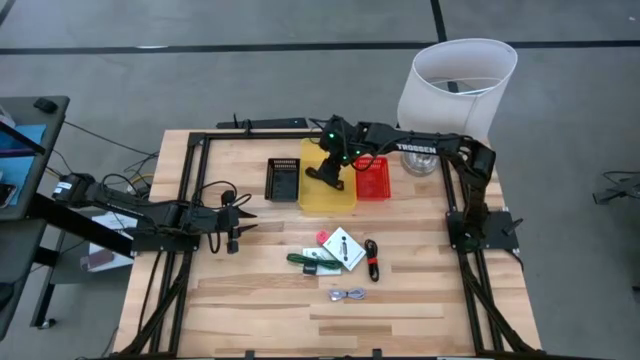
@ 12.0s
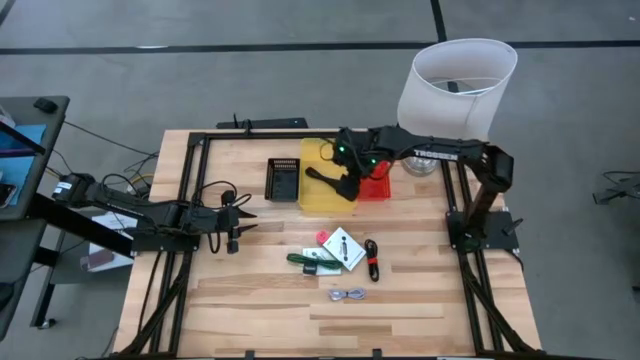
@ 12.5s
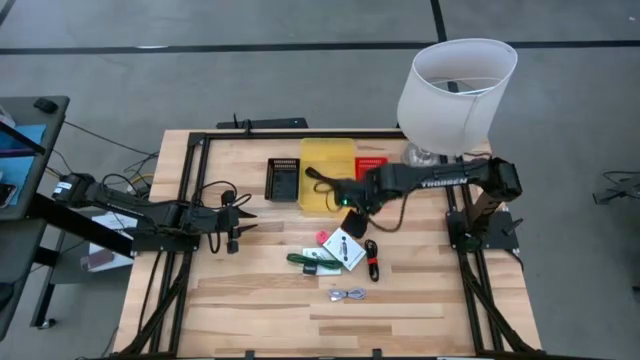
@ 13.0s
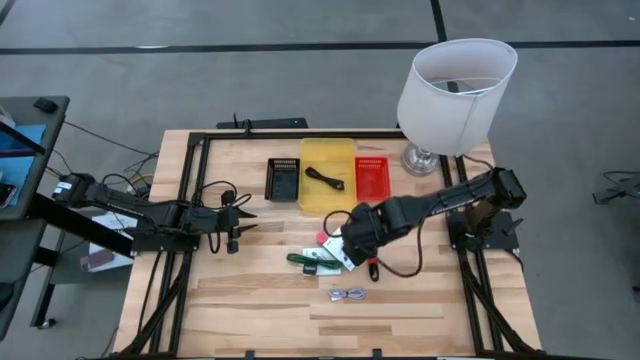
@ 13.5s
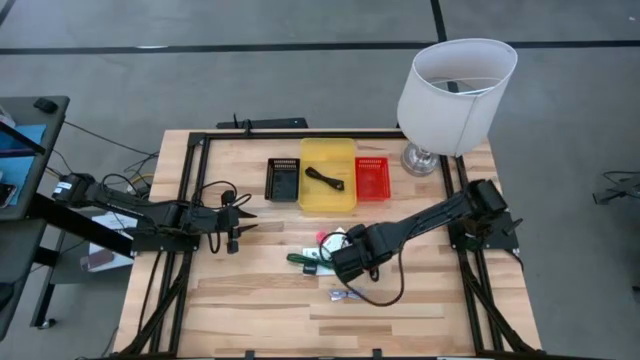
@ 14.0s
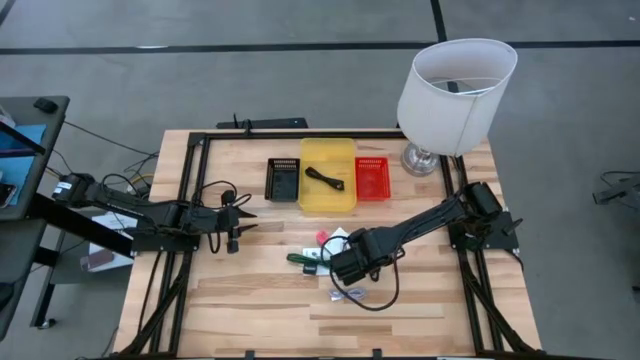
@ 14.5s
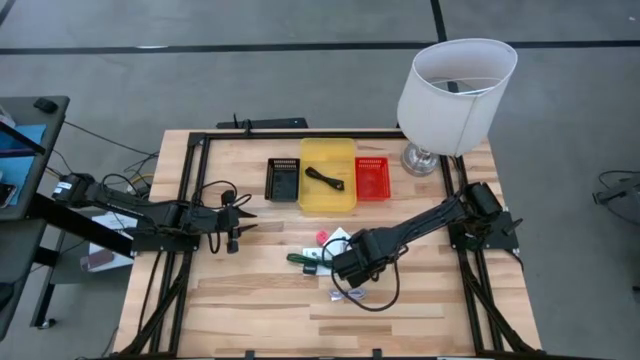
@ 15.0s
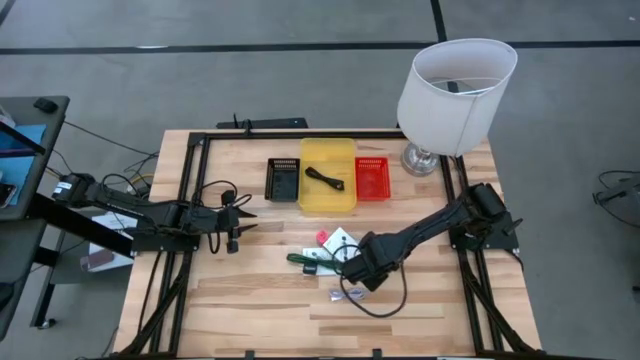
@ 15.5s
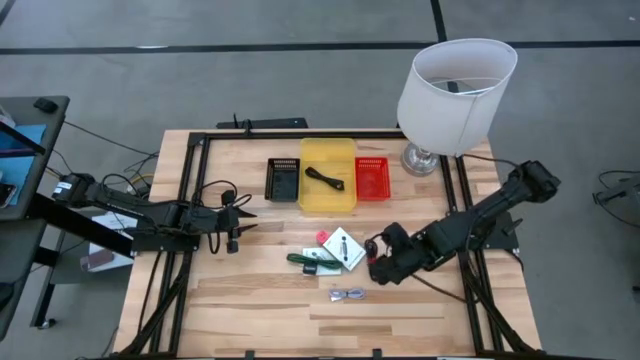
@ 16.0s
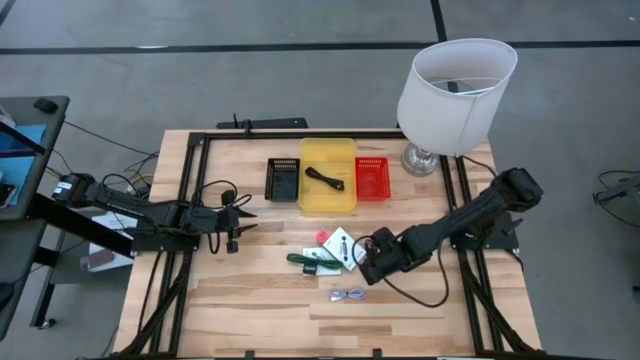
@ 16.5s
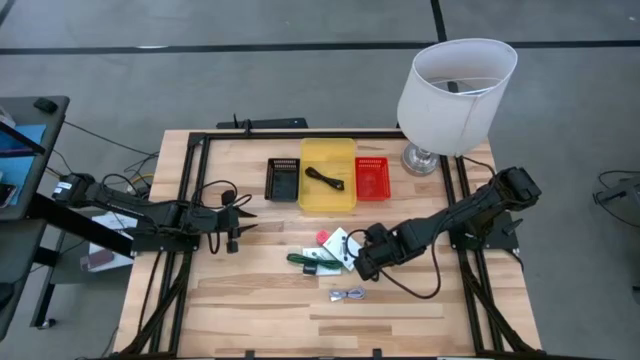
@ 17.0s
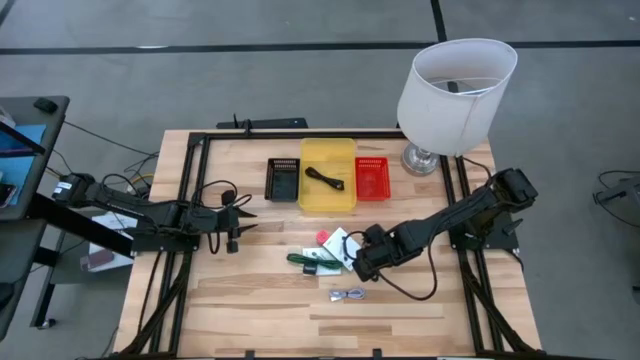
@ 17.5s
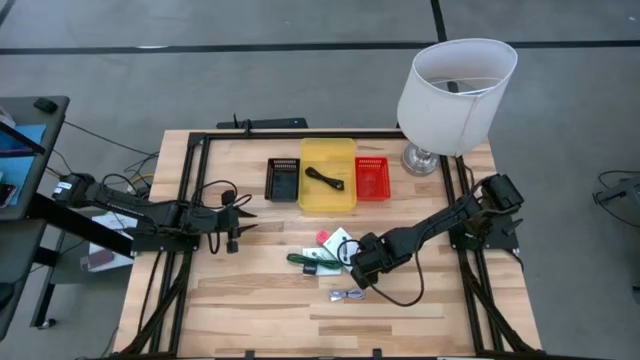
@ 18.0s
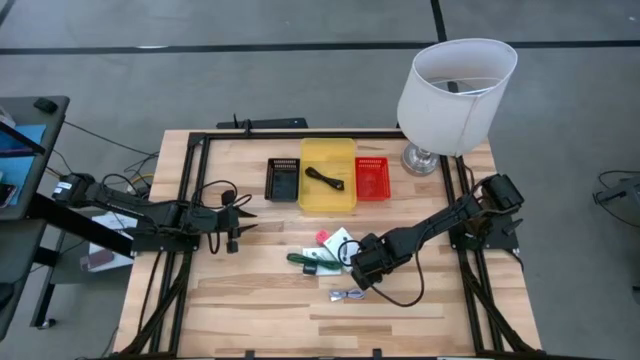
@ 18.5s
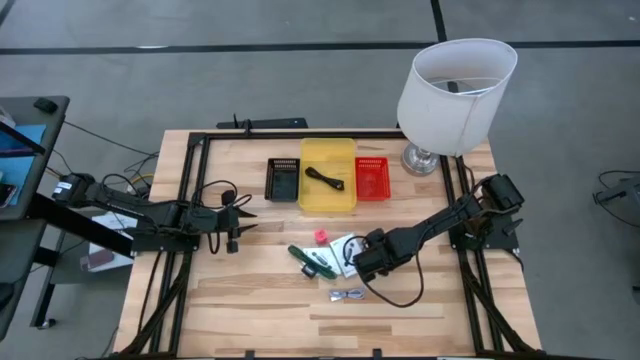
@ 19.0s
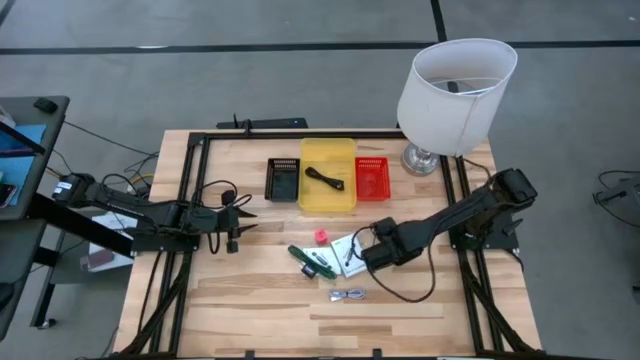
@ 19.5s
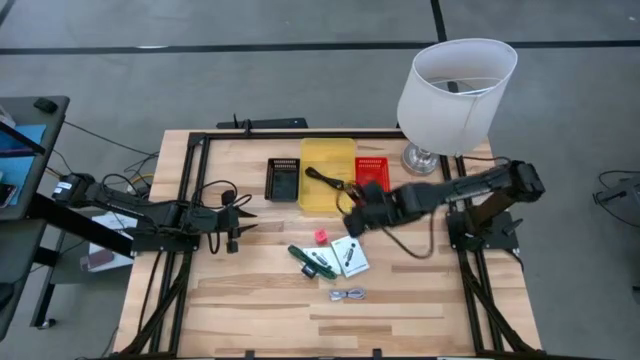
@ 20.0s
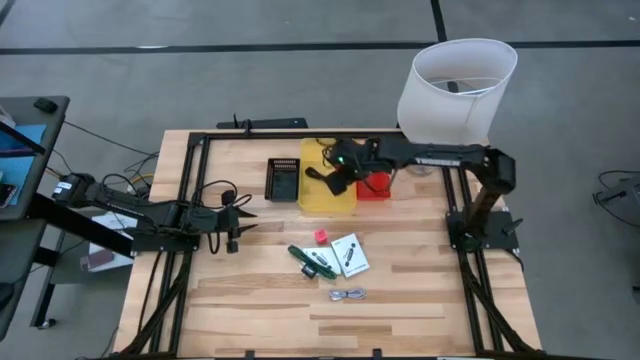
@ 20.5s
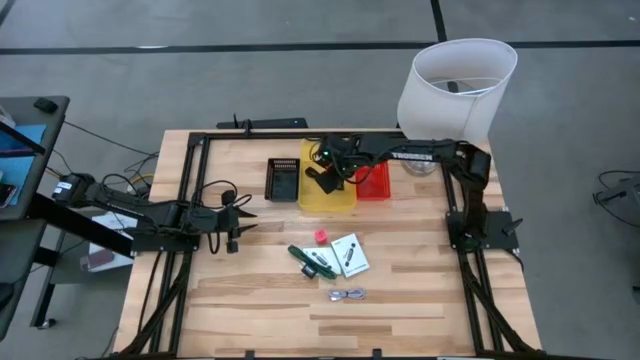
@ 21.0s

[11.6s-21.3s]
Task: Pick and place items into bin
Put the black charger cable into the yellow bin

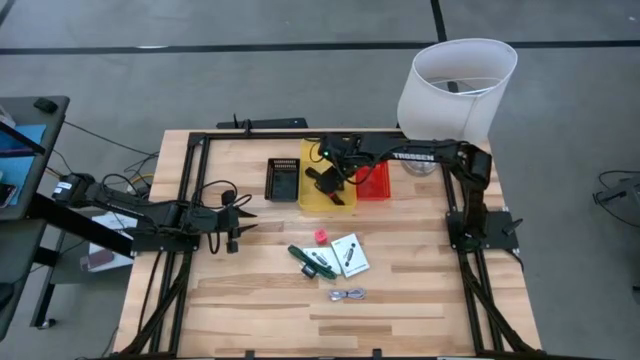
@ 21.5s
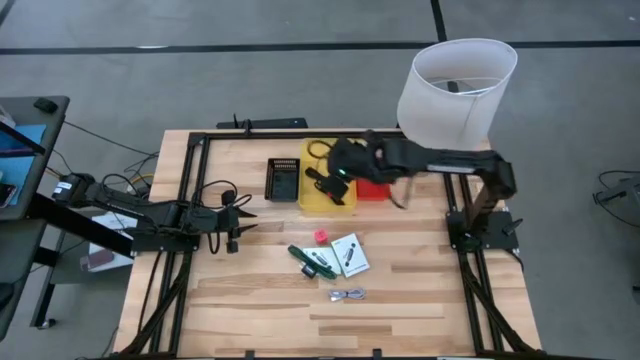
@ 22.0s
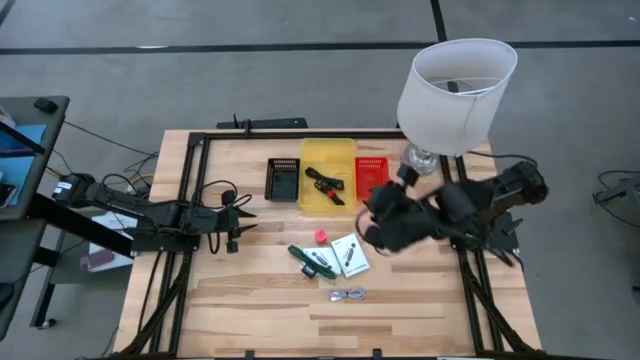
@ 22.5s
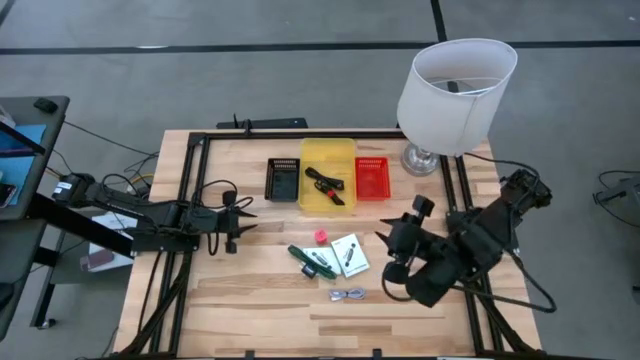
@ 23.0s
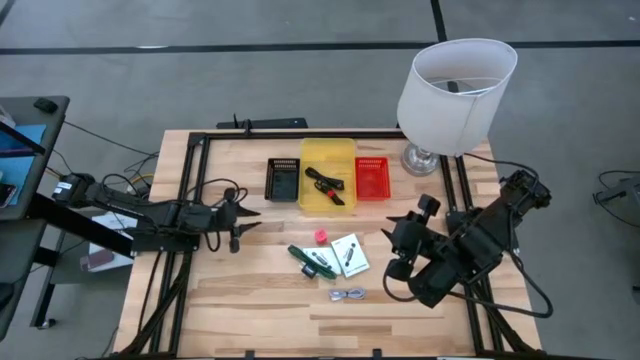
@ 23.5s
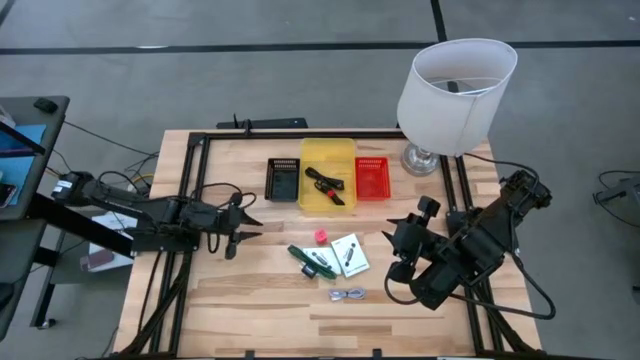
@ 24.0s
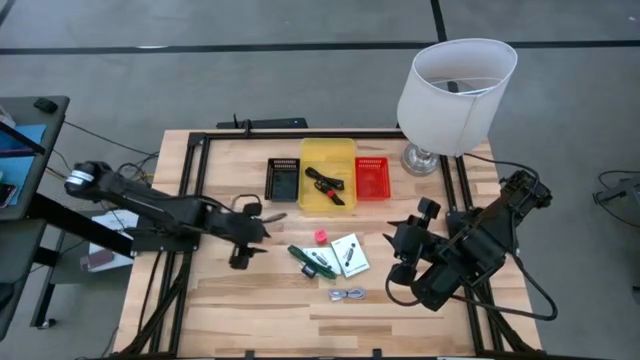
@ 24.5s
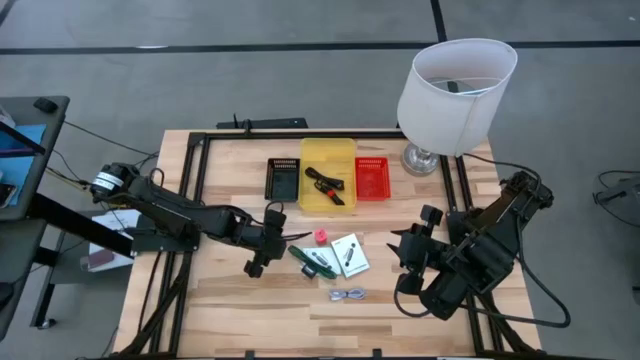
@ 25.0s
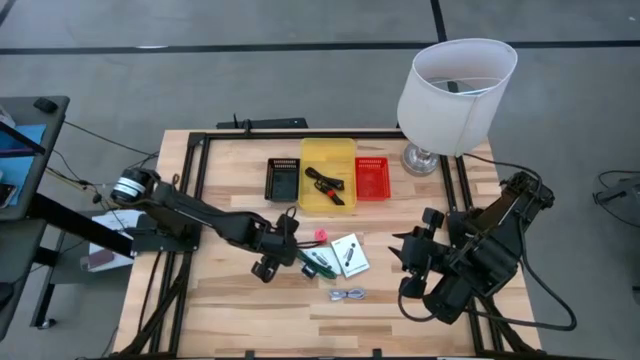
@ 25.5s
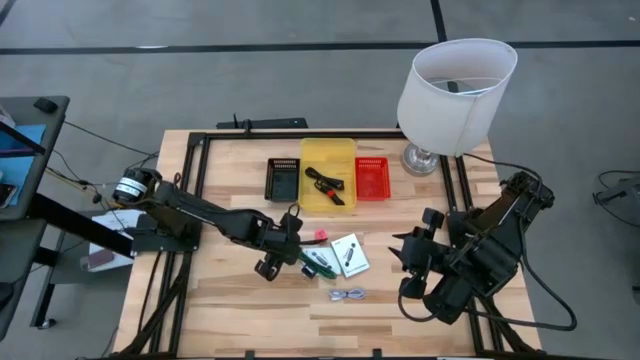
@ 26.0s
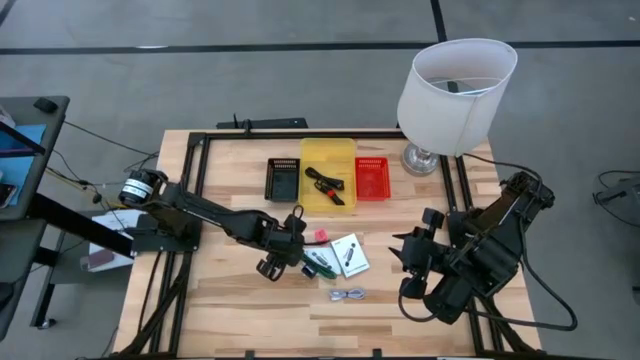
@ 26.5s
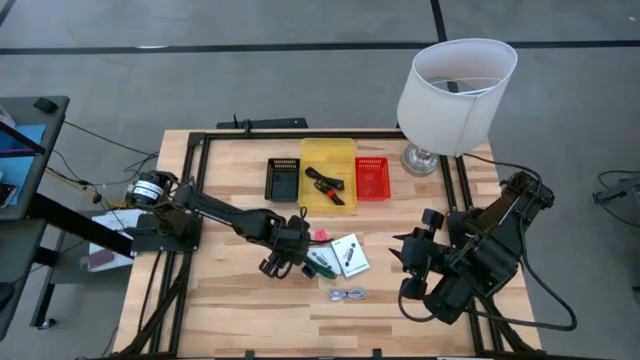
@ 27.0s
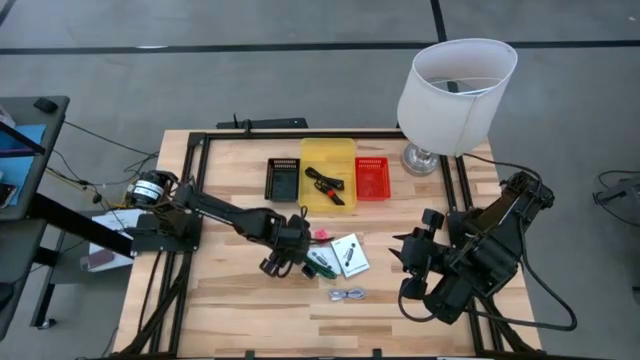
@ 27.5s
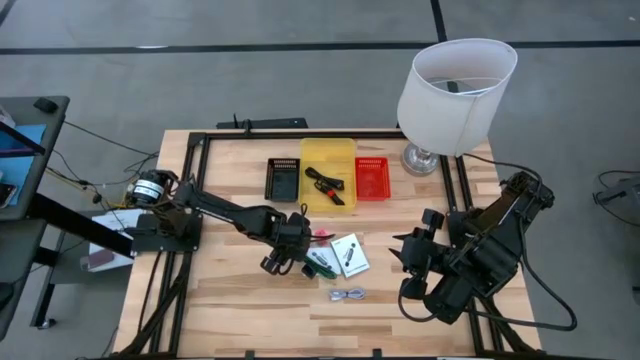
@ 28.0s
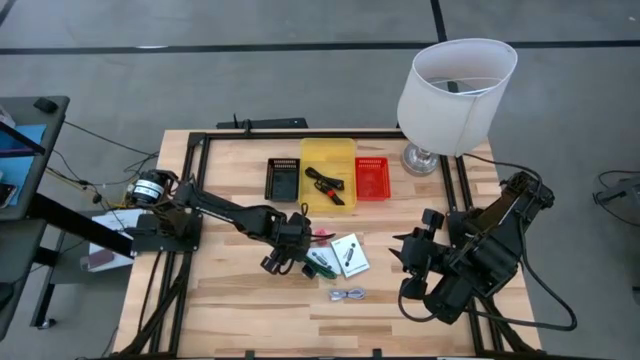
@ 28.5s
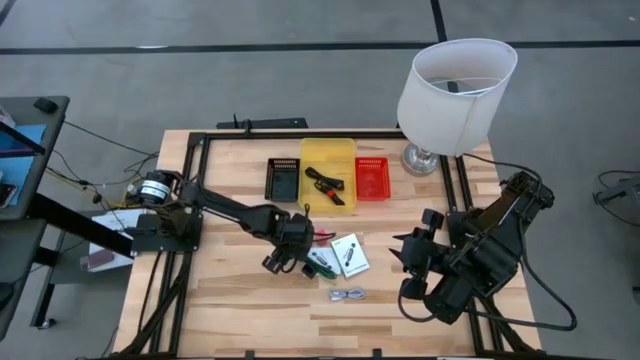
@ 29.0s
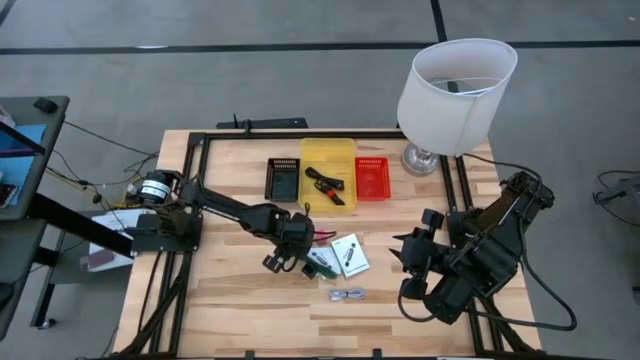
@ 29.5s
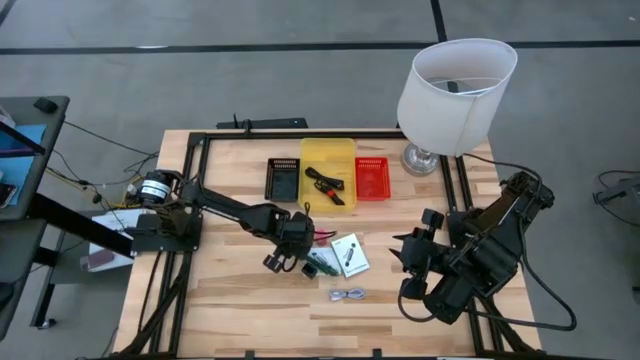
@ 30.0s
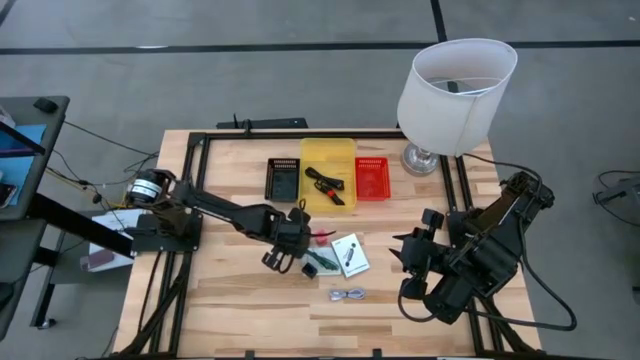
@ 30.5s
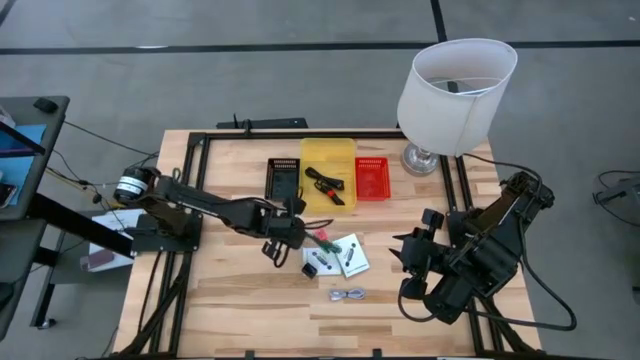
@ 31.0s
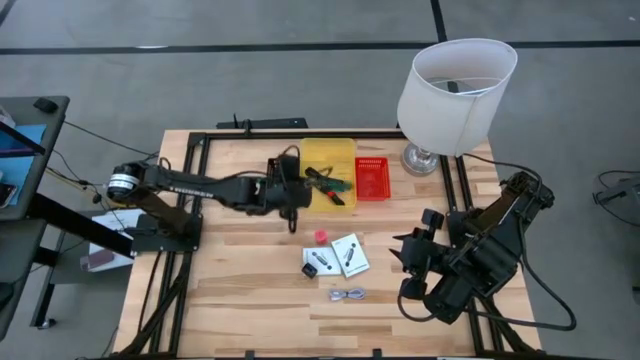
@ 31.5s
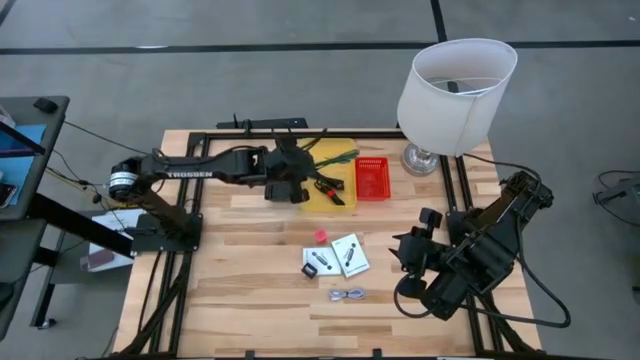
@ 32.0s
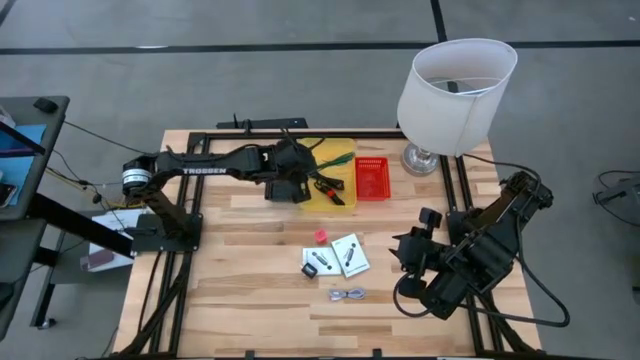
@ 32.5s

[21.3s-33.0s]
Put the green charger cable into the yellow bin

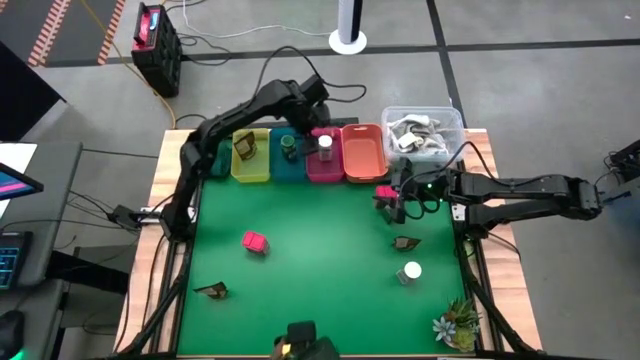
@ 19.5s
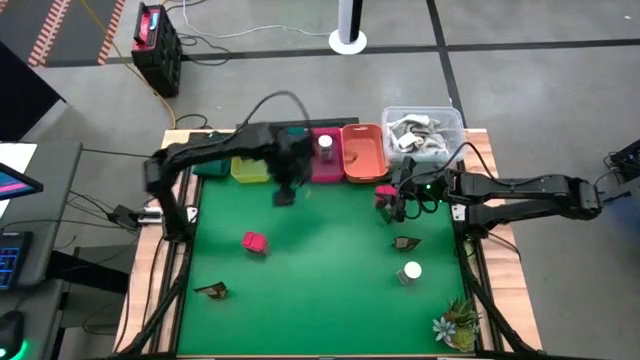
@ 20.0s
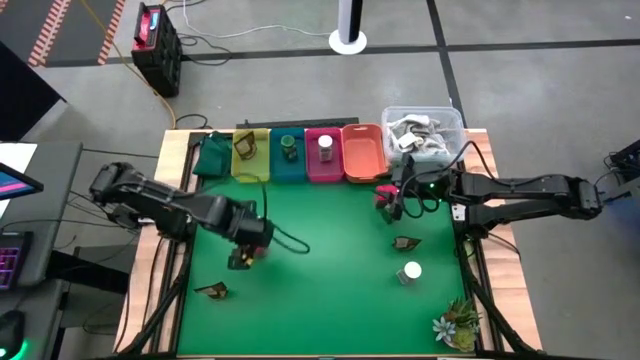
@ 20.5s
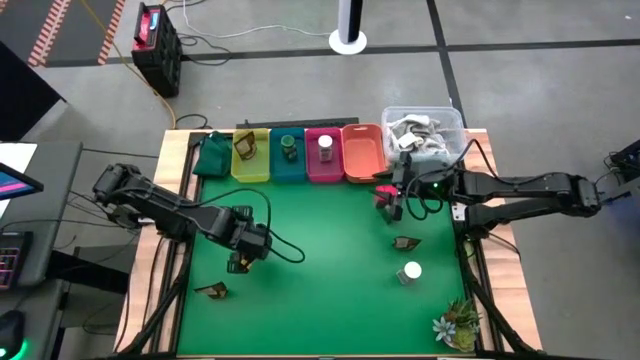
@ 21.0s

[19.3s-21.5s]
Task: Sort spices by type
Put the left red spice can into the orange bin
